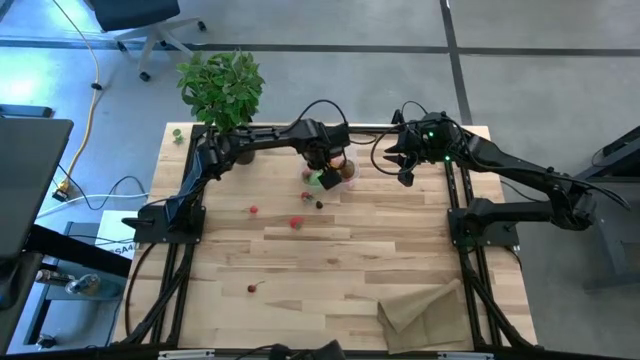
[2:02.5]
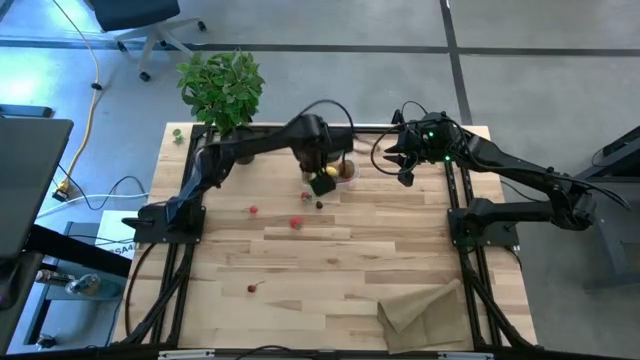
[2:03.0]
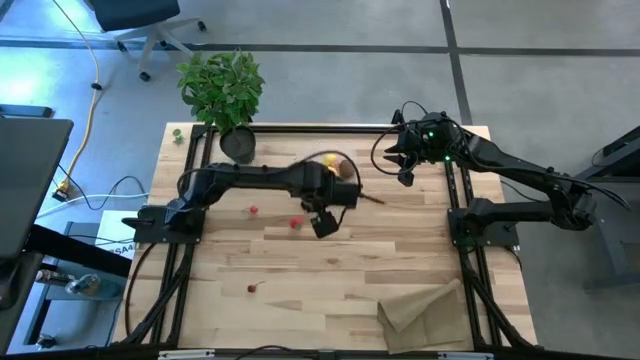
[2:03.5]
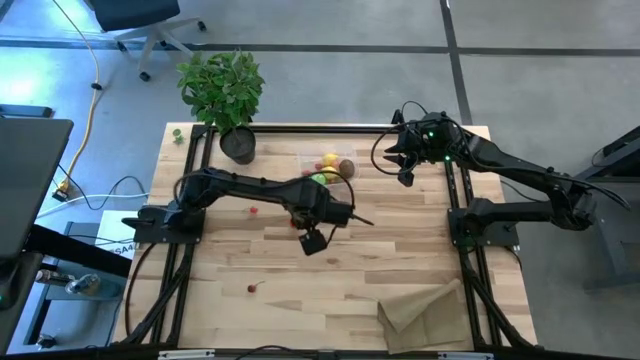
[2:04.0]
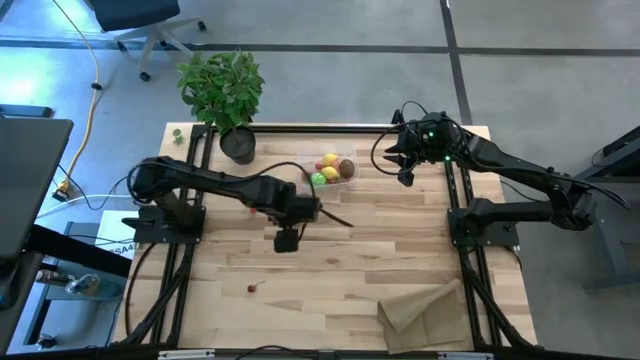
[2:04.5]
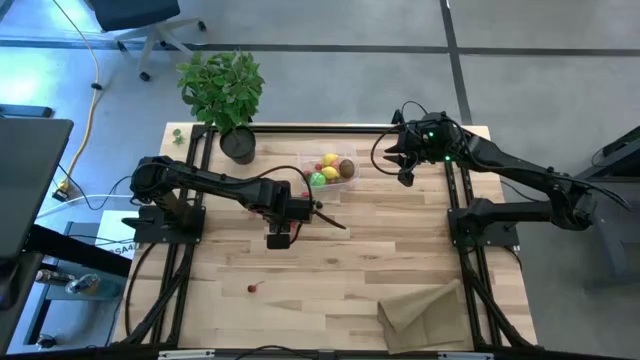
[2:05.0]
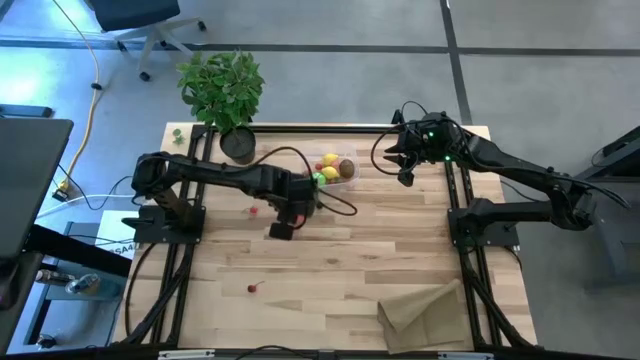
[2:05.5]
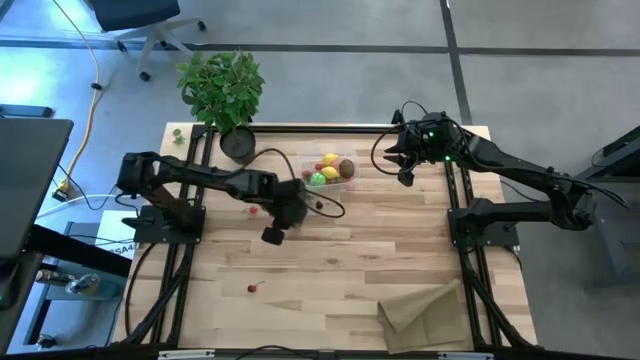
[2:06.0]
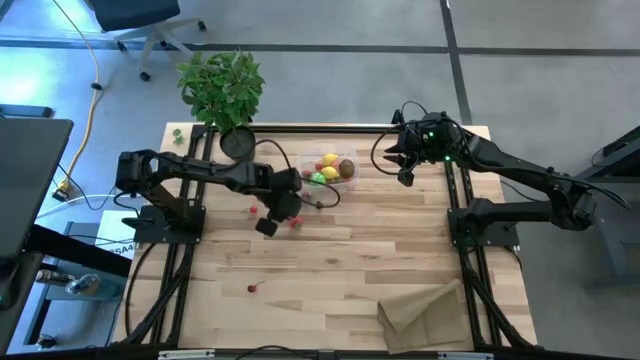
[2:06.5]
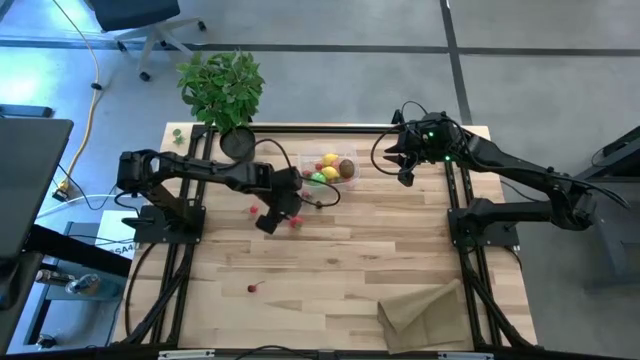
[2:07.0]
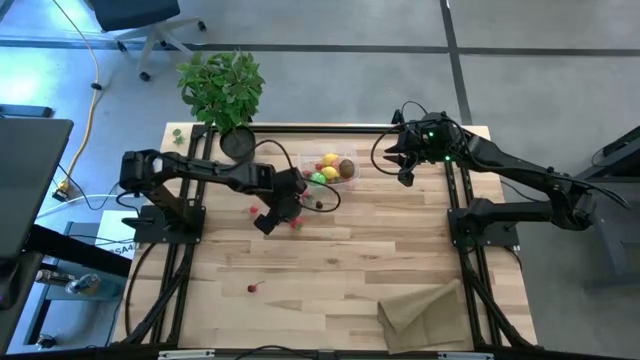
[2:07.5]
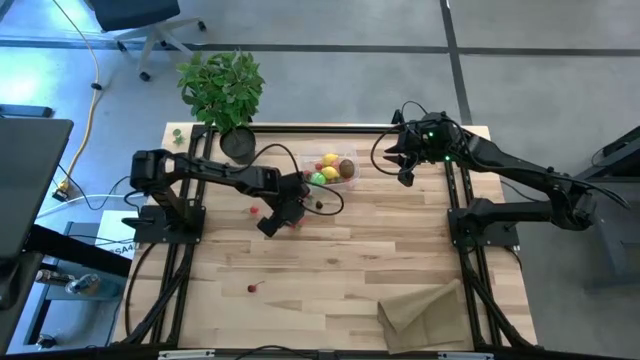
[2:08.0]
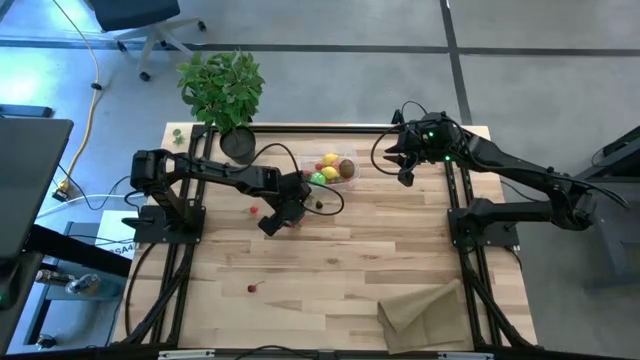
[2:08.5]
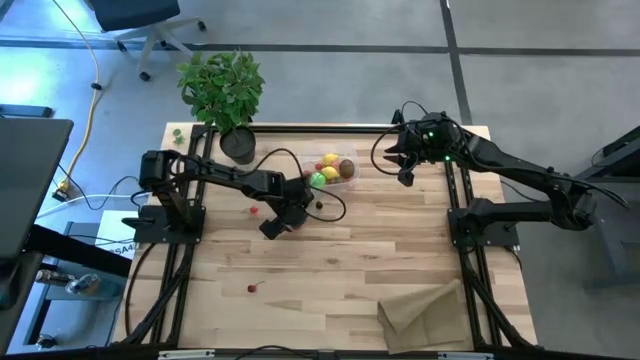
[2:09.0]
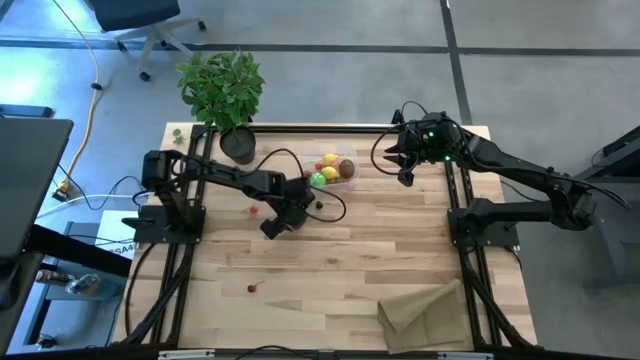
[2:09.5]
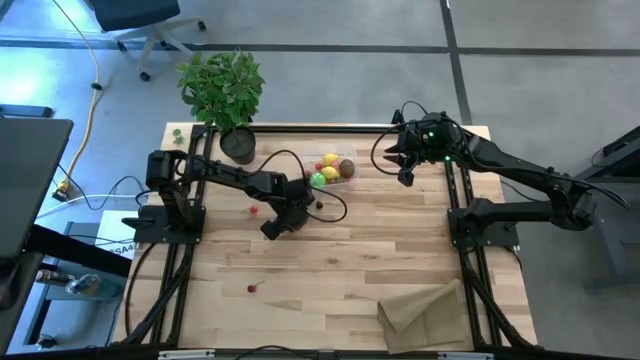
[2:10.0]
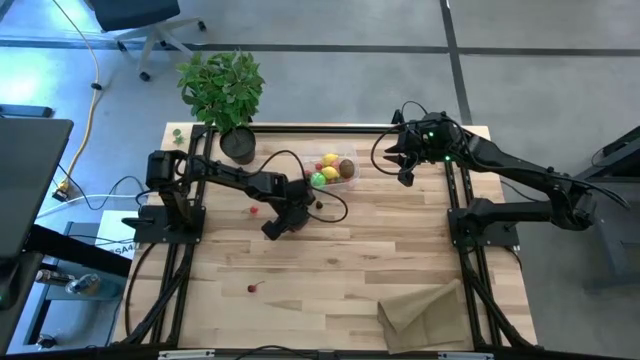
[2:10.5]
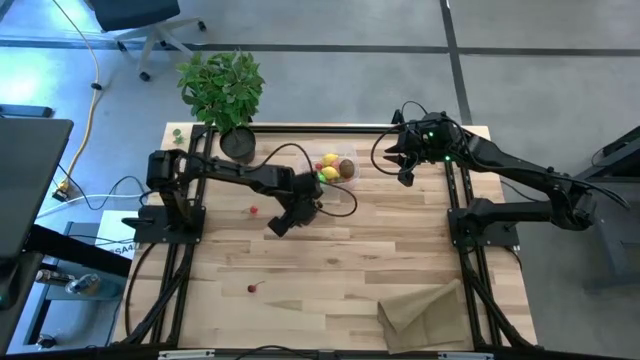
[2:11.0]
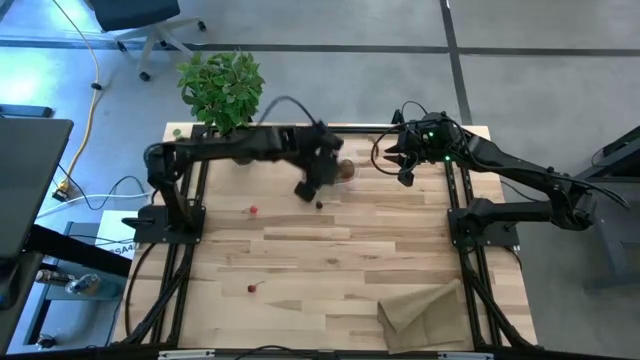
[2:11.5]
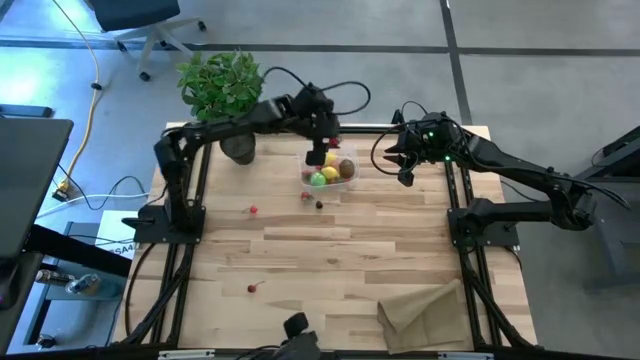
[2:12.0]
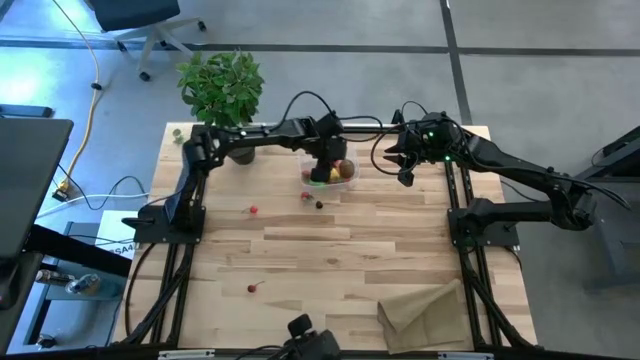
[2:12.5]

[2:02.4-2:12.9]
Task: Pick and placing Produce into tupperware
Put the bottom strawberry into the transparent bin

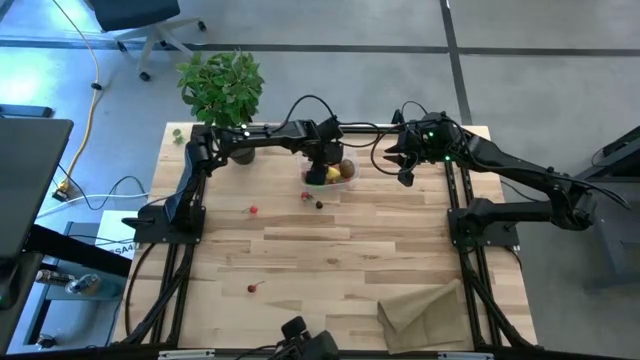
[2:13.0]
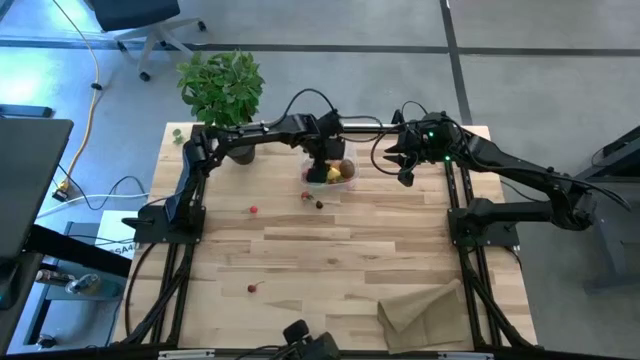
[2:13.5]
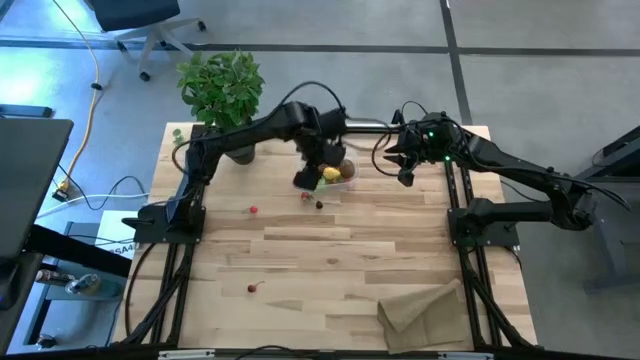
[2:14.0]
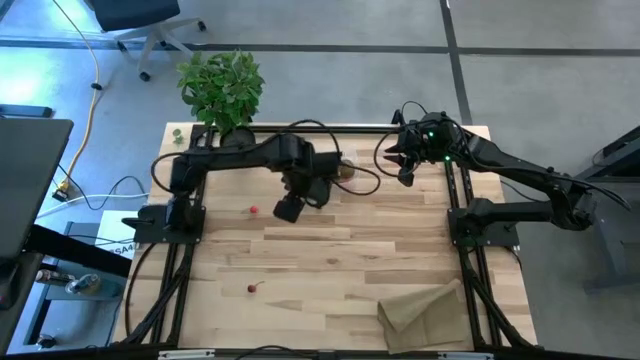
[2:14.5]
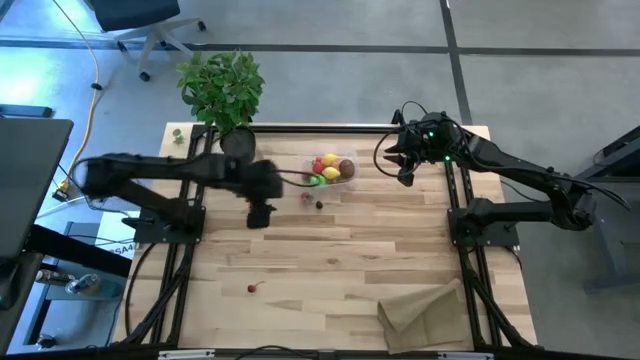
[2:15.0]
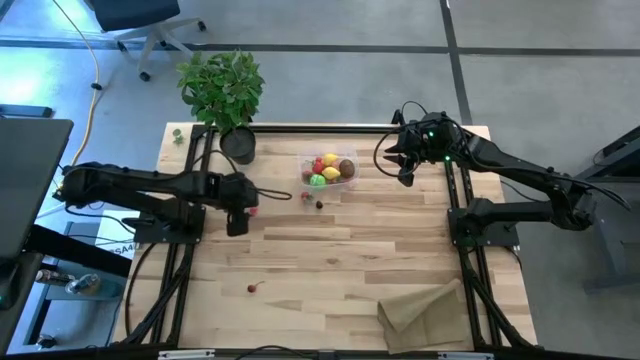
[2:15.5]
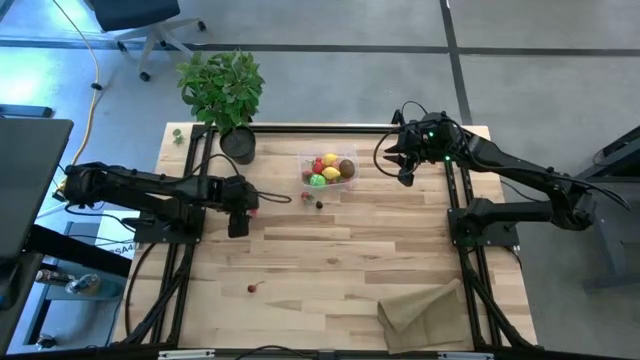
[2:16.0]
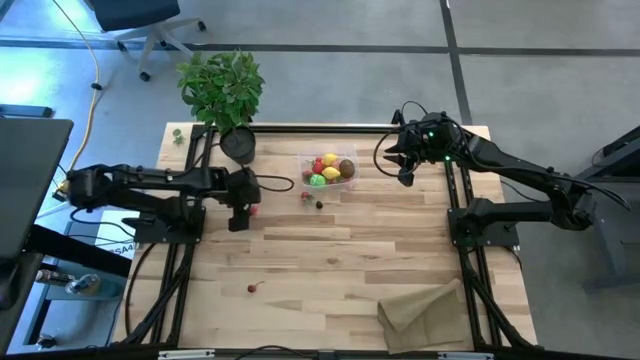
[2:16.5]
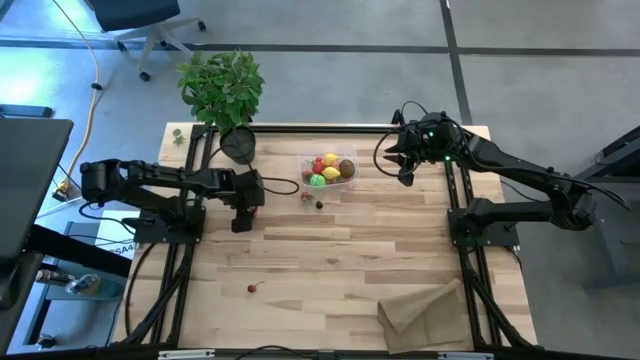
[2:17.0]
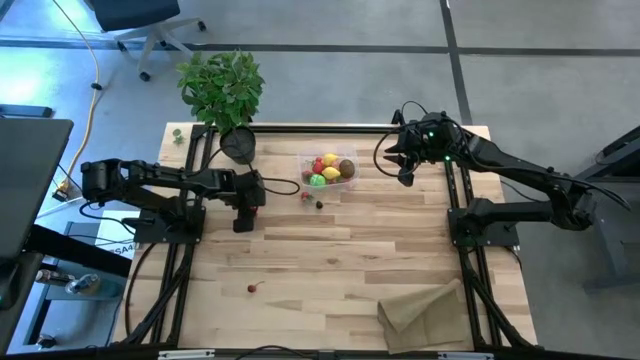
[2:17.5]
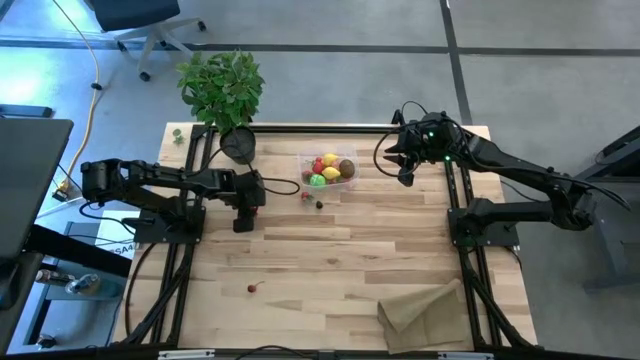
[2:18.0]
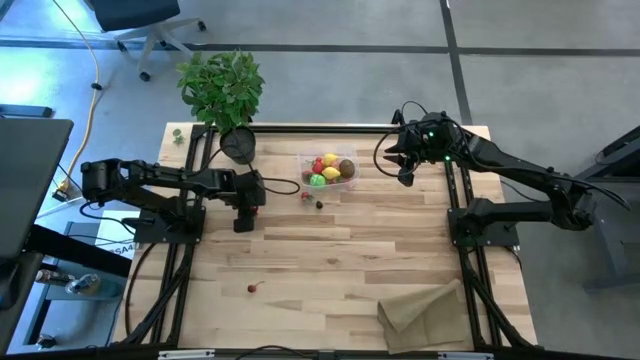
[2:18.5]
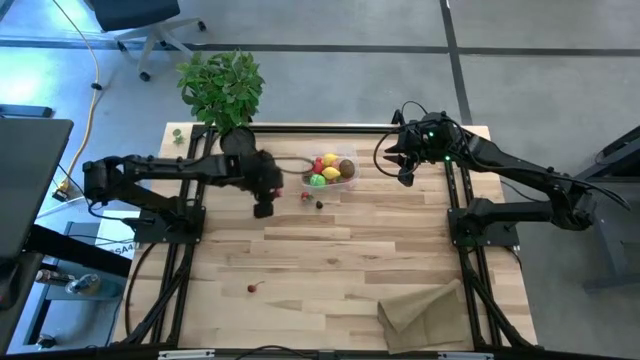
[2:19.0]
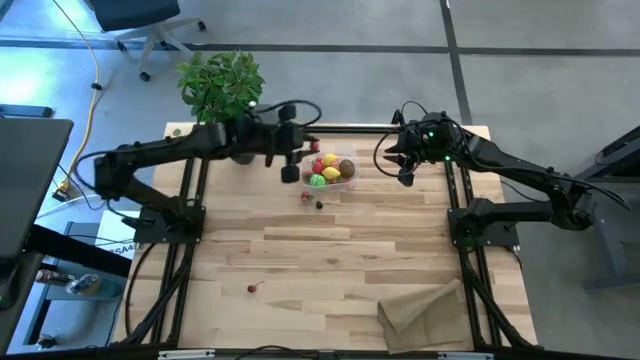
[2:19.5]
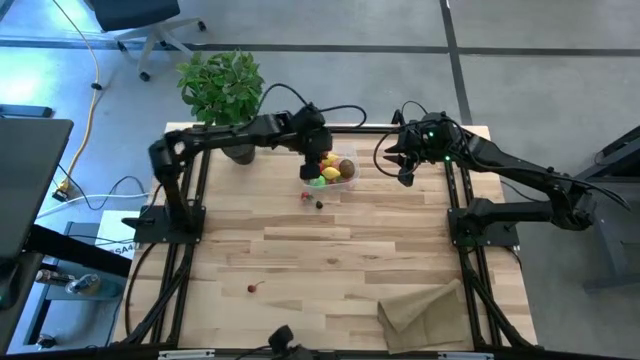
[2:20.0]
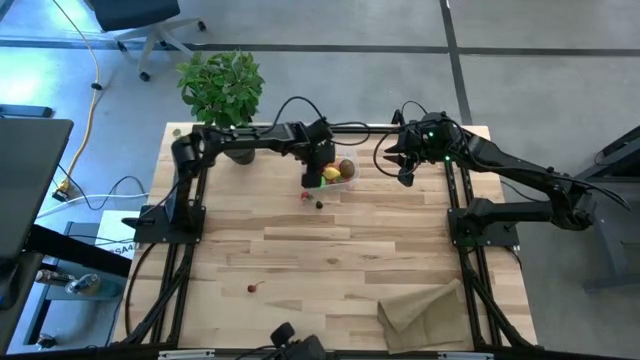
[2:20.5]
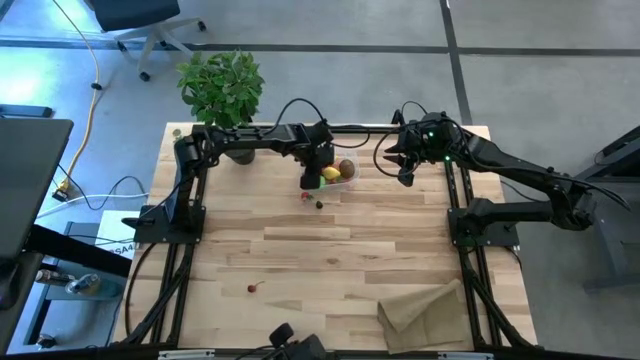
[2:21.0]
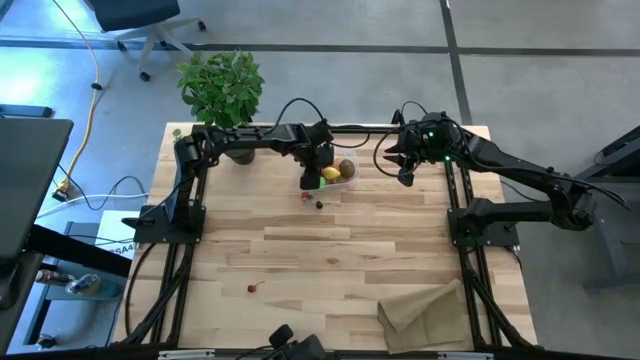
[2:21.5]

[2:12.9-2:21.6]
Put the top cherry into the transparent bin

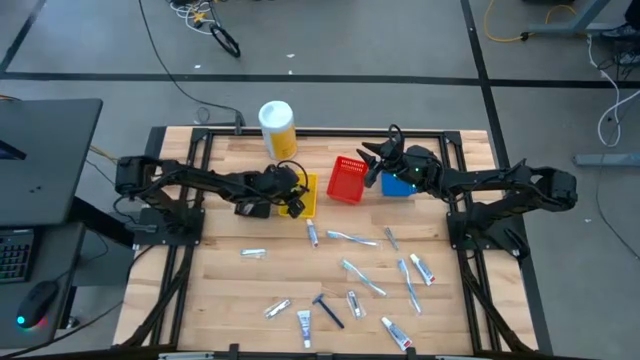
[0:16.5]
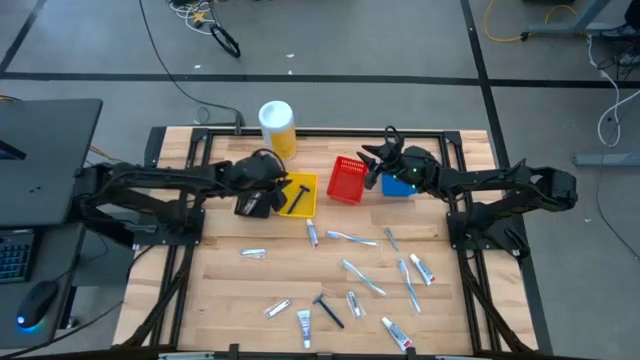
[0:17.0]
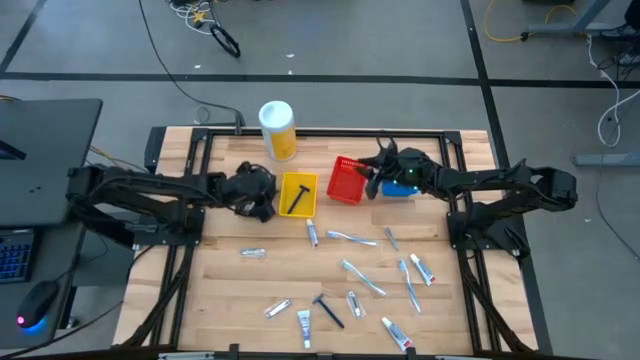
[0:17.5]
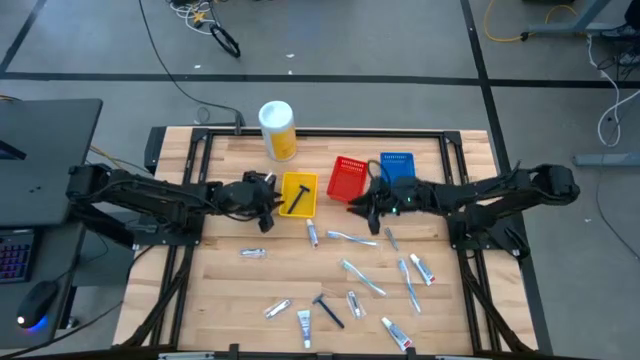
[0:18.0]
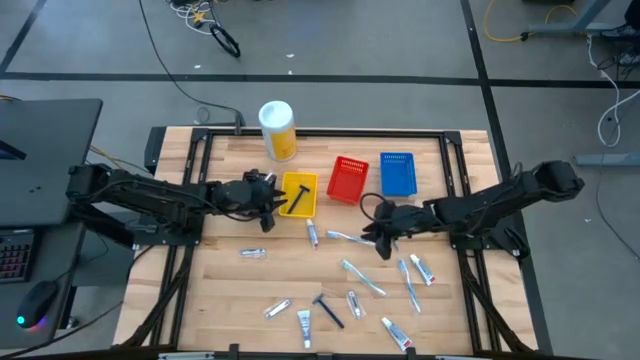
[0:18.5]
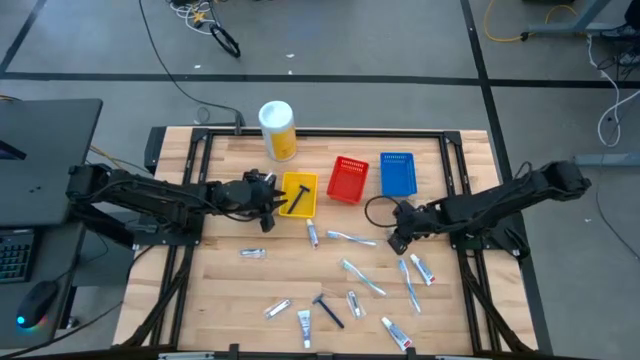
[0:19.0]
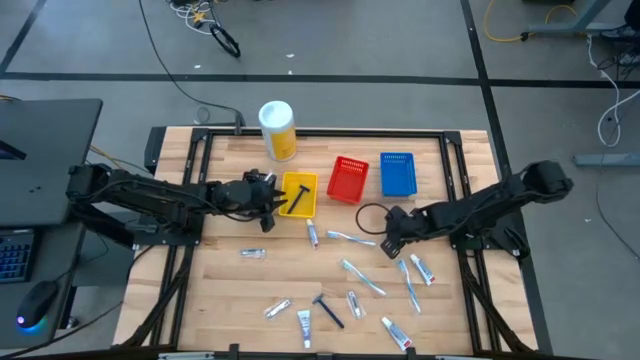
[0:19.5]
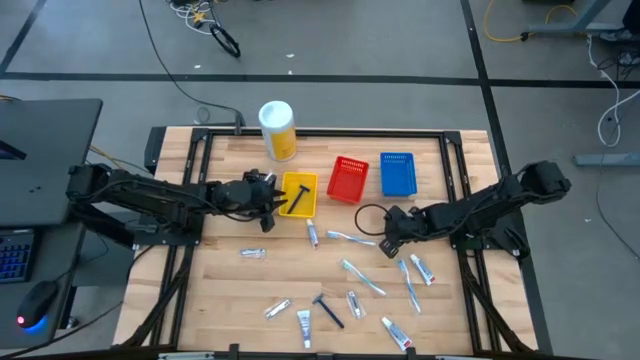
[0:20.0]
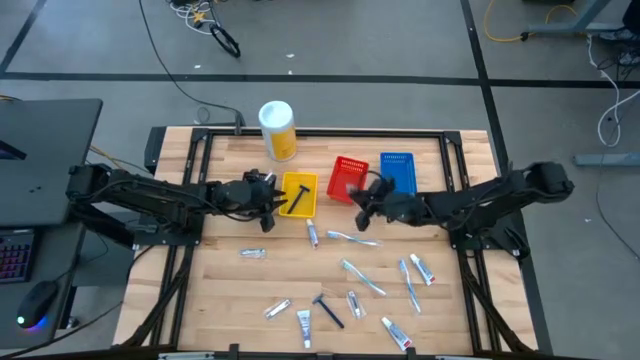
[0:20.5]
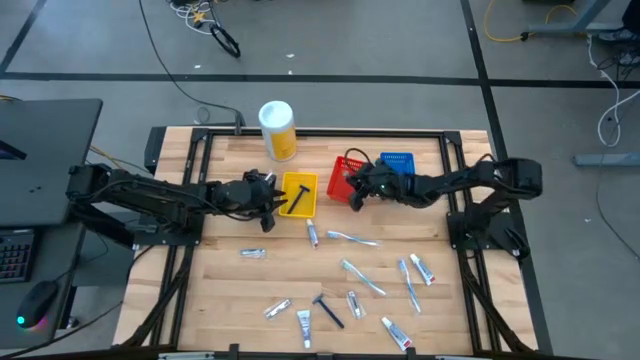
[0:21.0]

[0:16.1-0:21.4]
Task: Pick & Place Travel size toiletries
Put the silver nail cutter into the red bin
